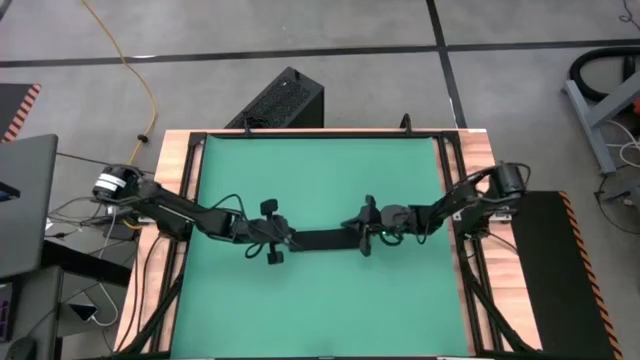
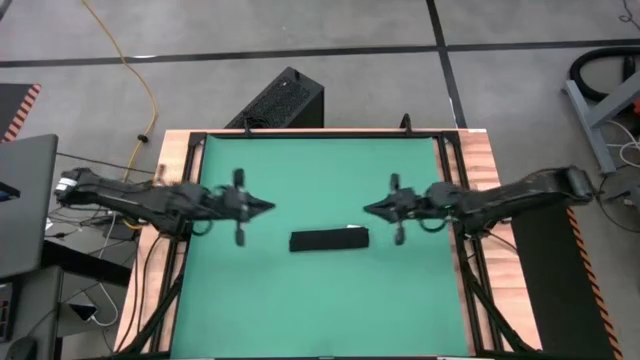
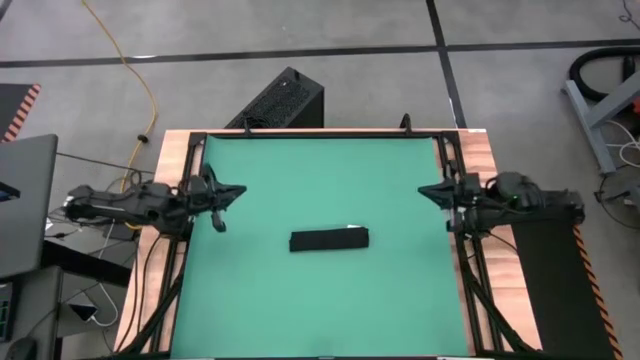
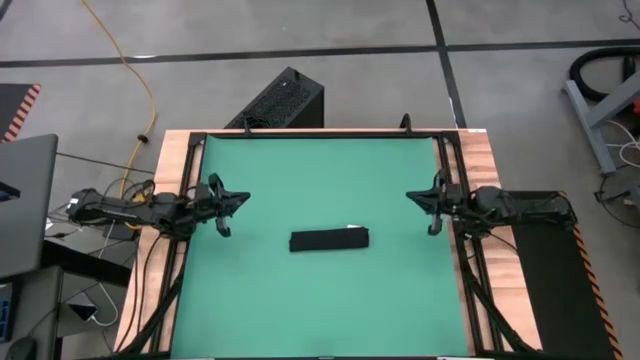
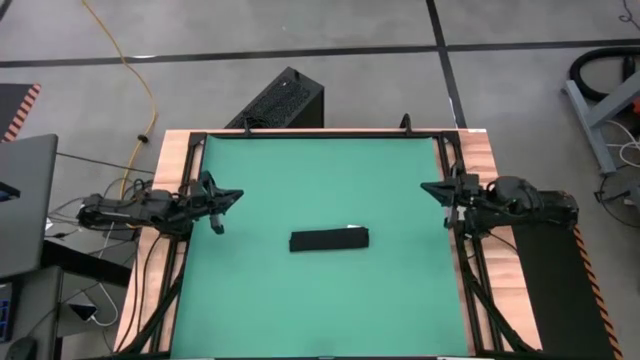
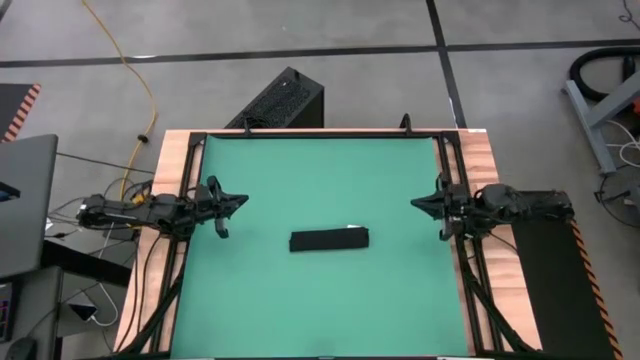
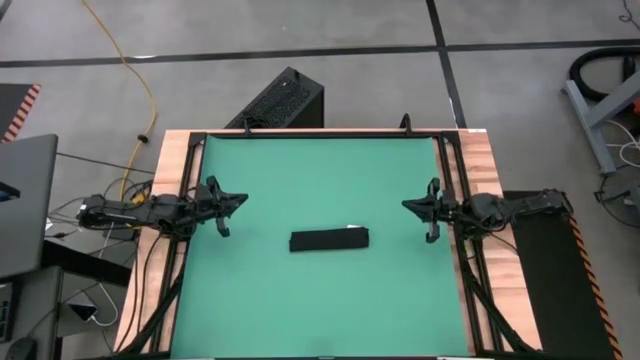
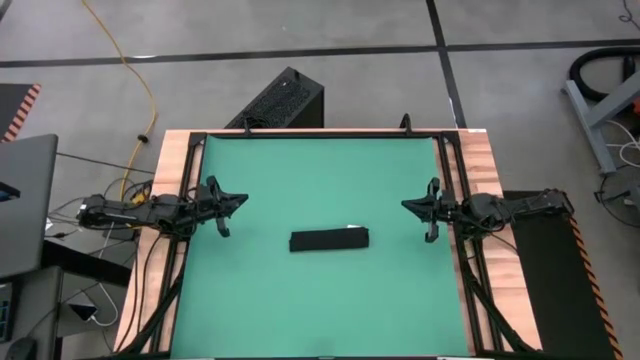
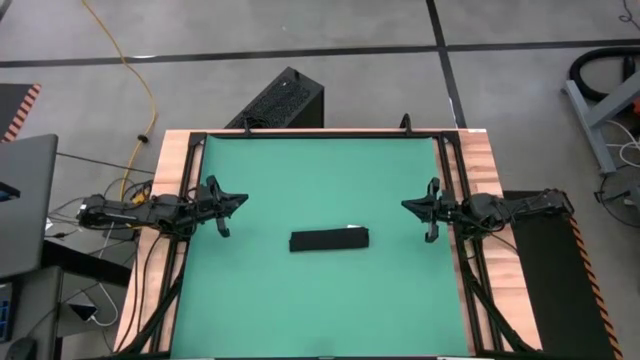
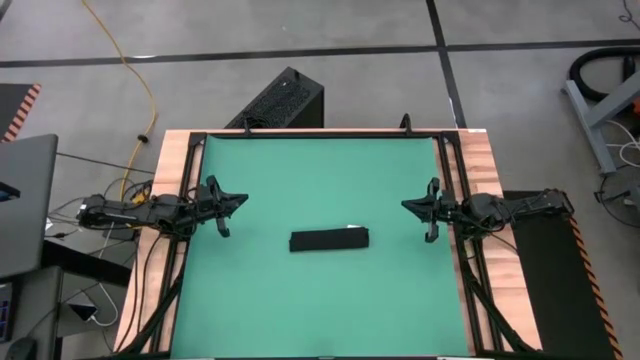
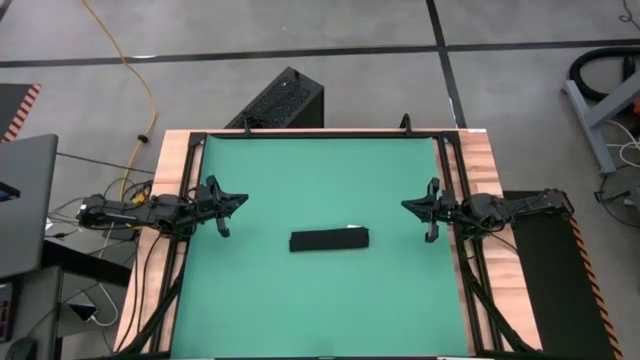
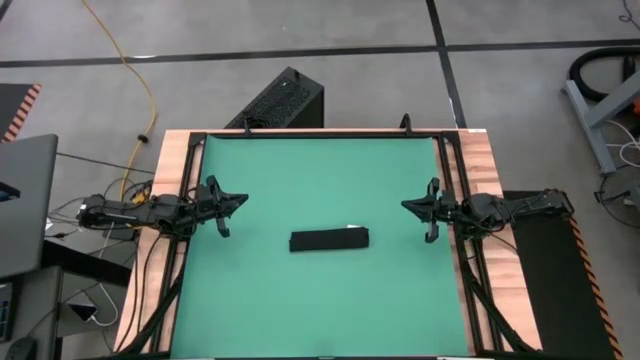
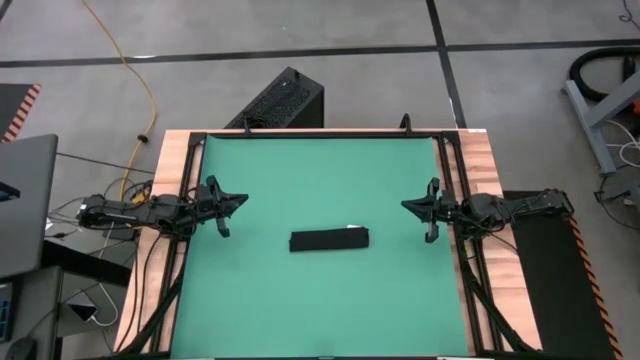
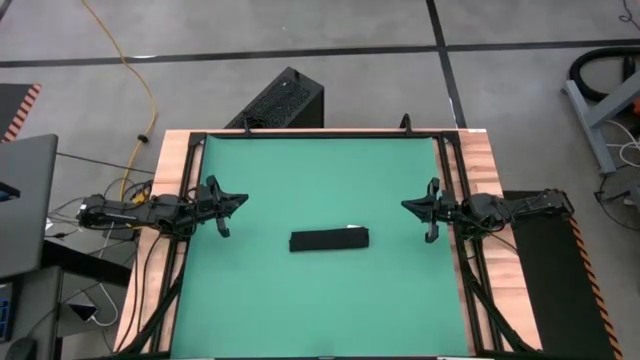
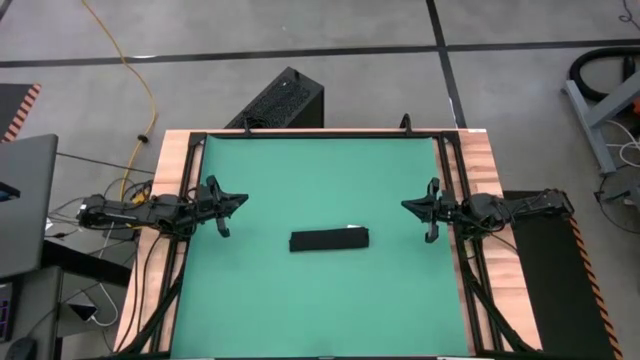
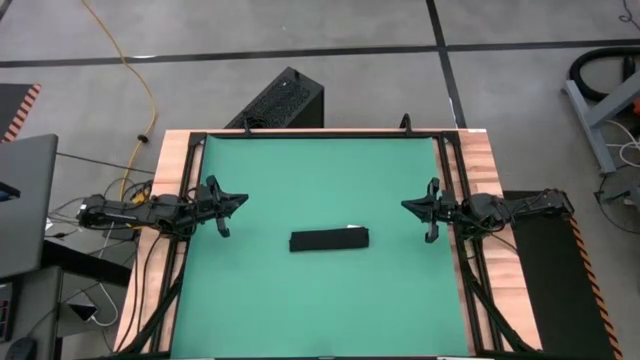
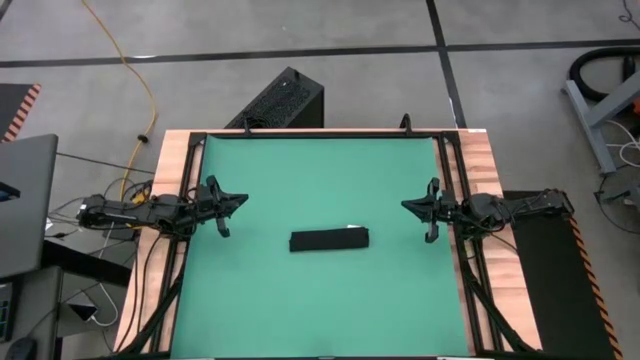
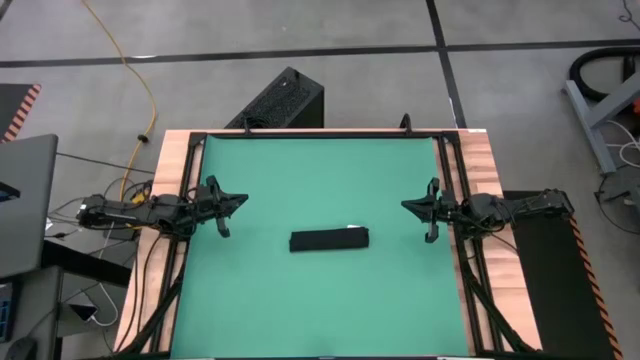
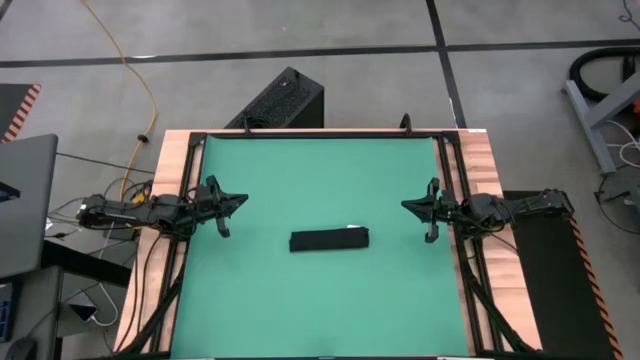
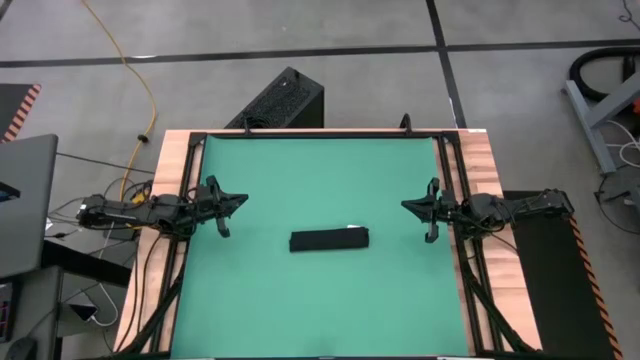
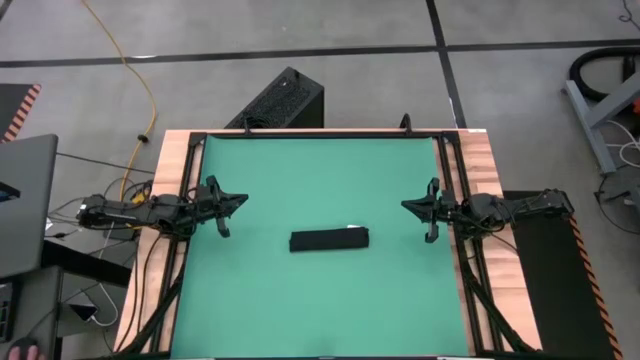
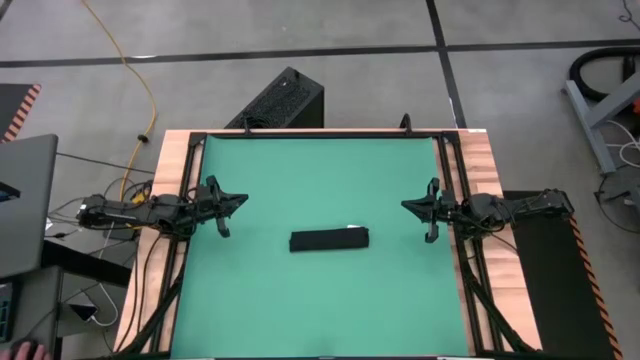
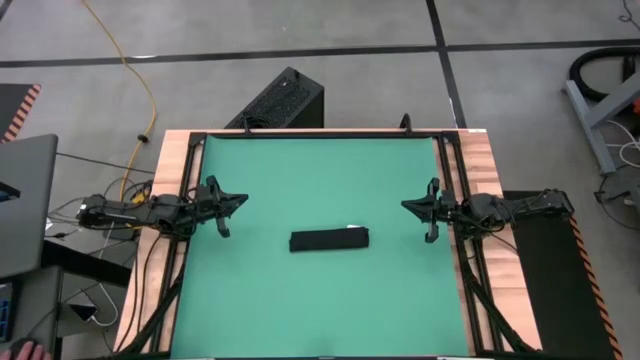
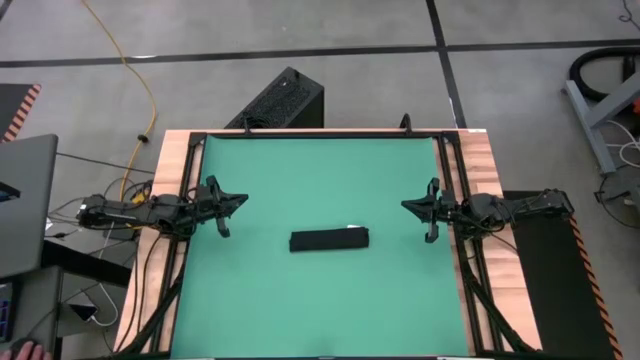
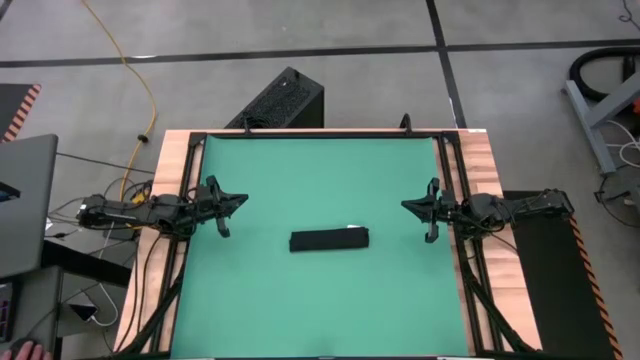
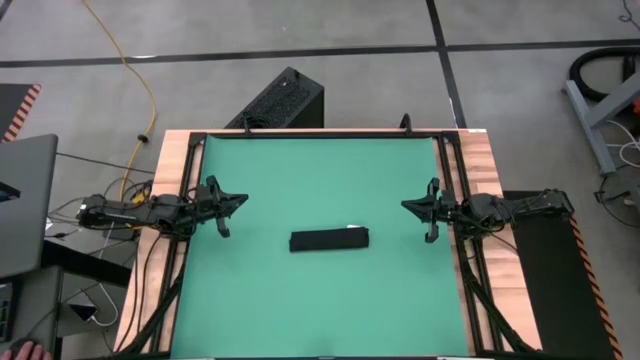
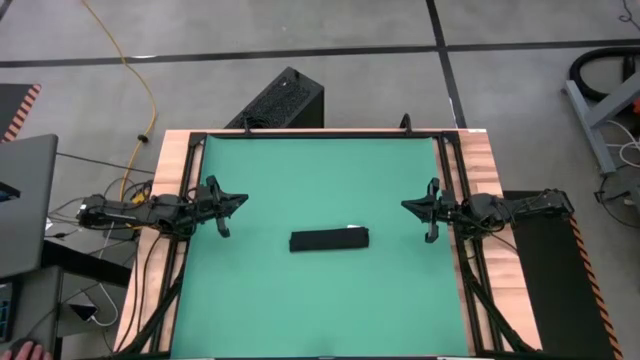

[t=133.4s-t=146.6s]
Task: Roll towel into tight, uniform cylinder
Return to Home Position

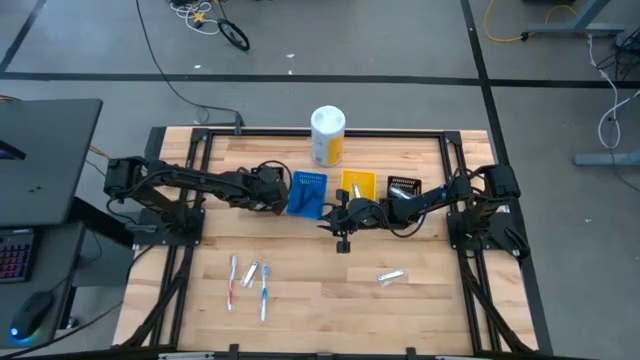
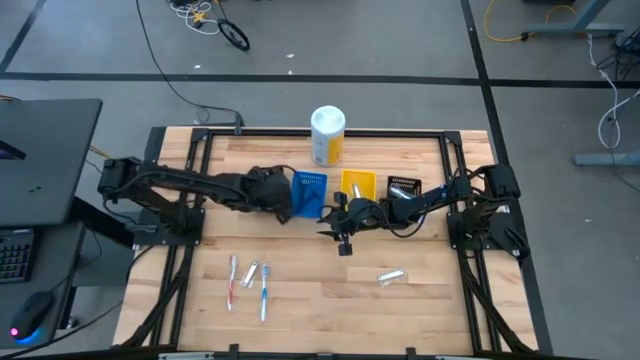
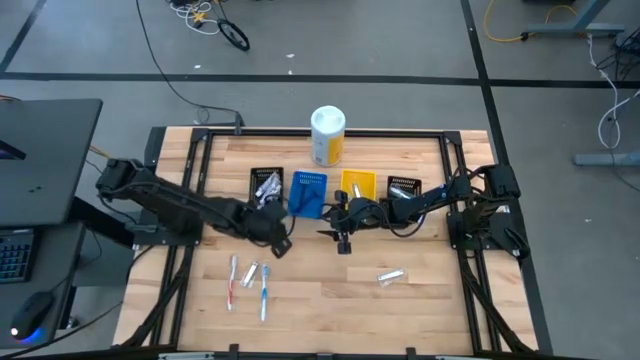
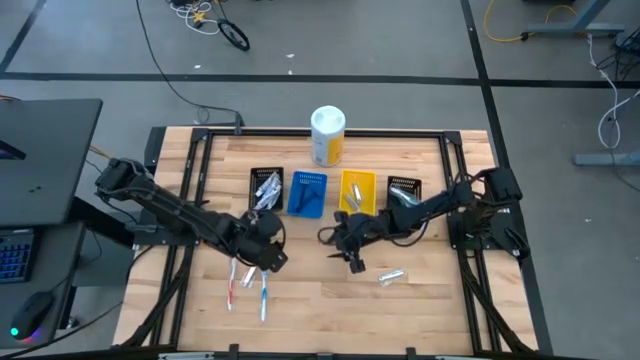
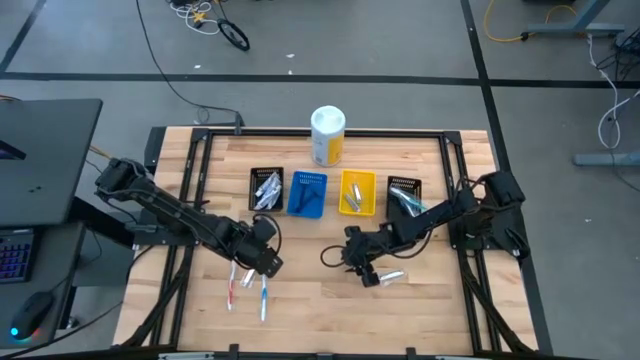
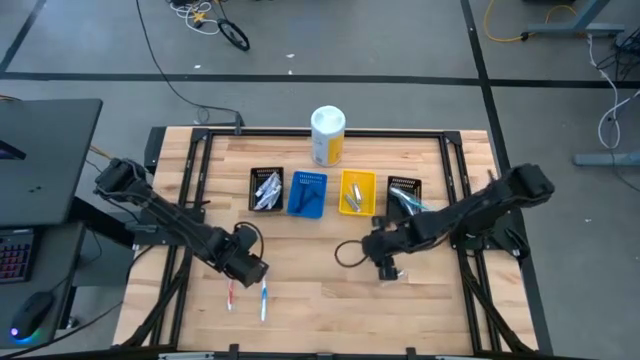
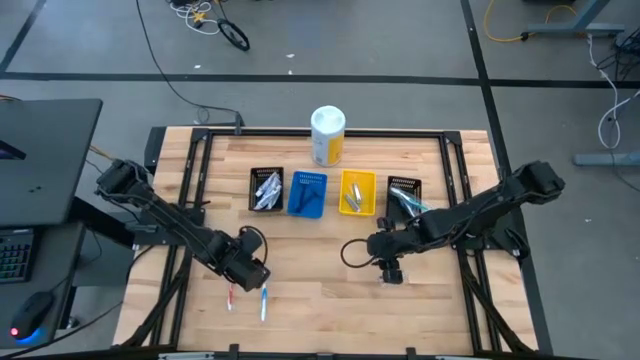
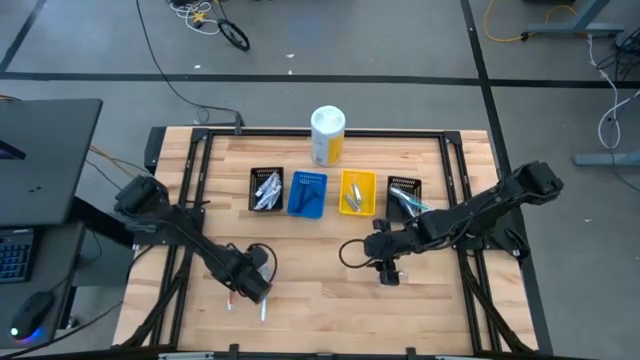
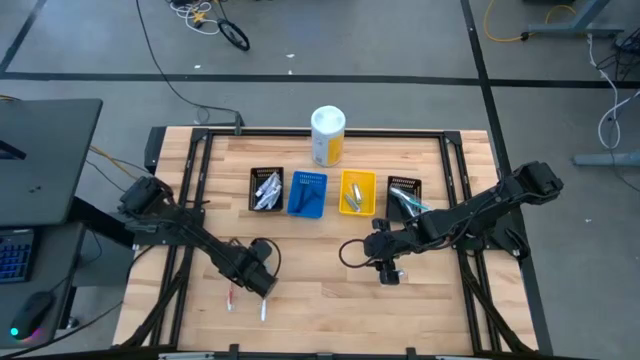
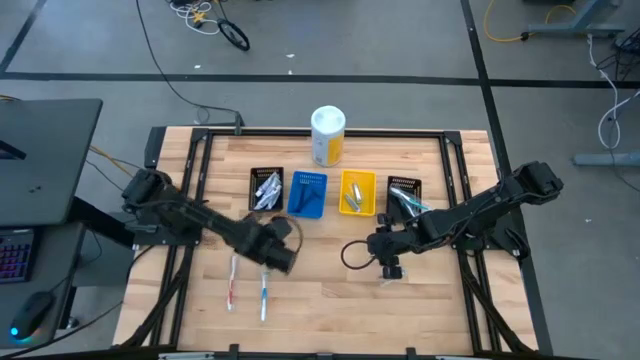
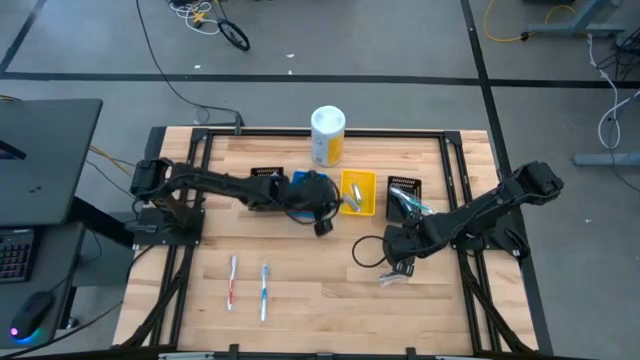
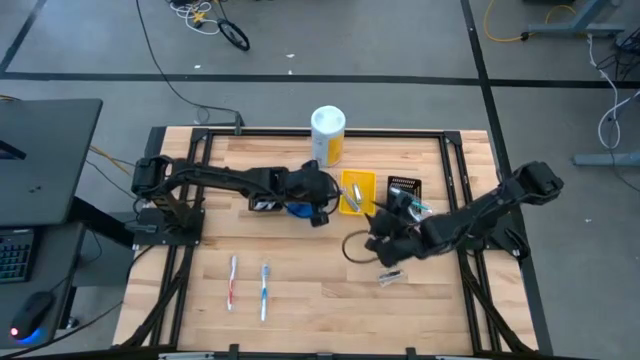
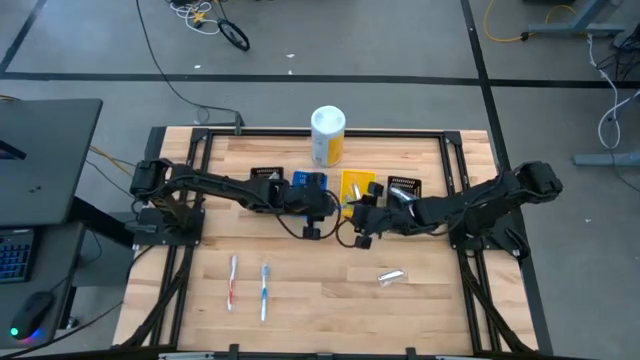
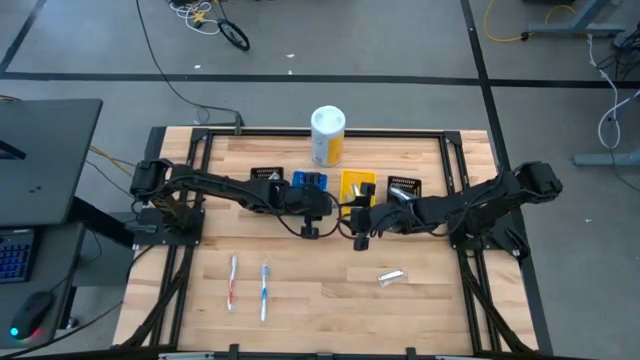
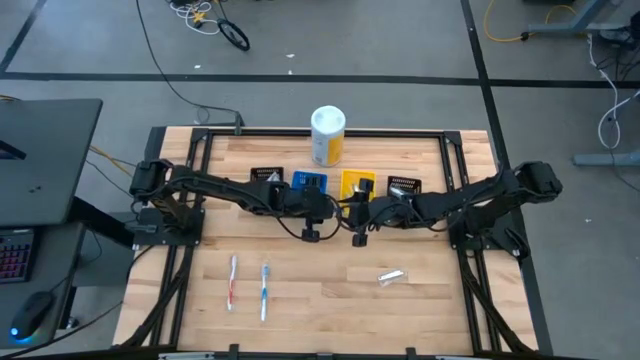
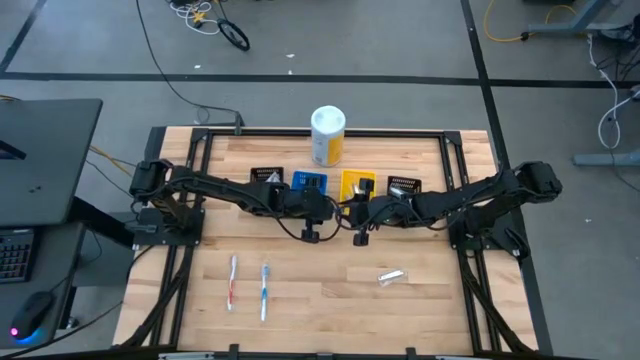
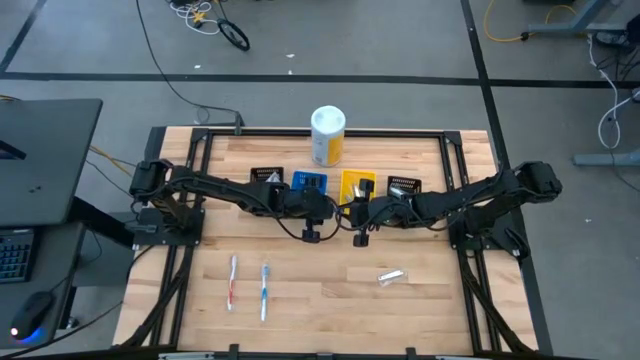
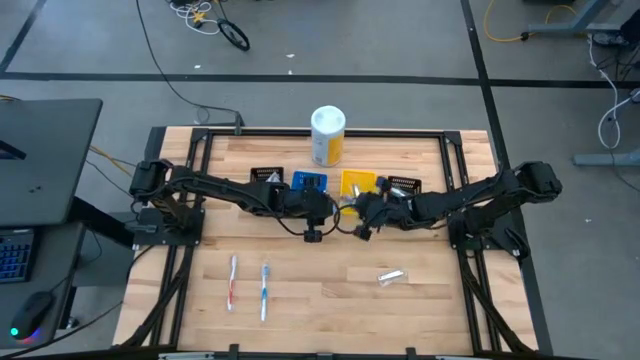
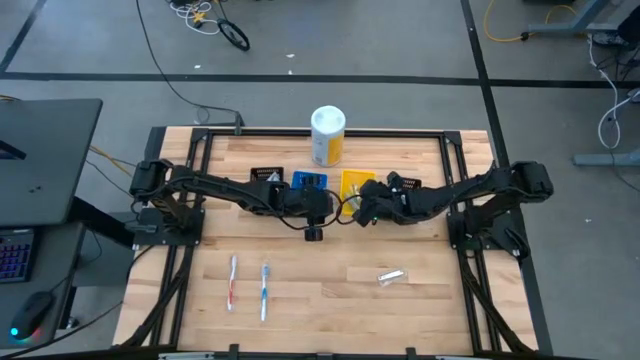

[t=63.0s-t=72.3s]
Task: Pick & Place Travel size toiletries
Put the nail cutter into the yellow bin
